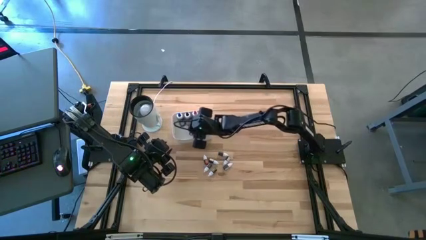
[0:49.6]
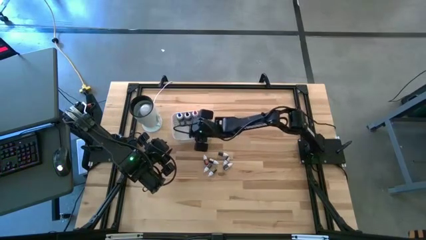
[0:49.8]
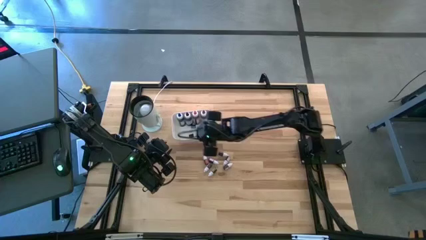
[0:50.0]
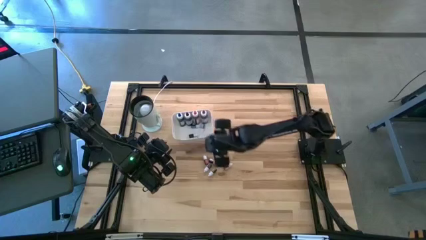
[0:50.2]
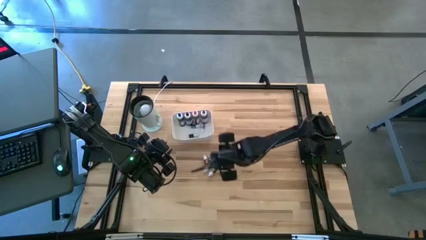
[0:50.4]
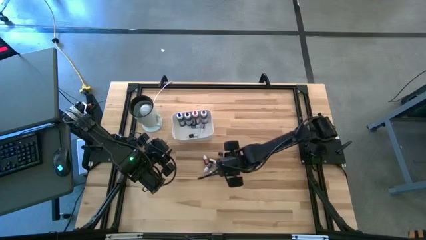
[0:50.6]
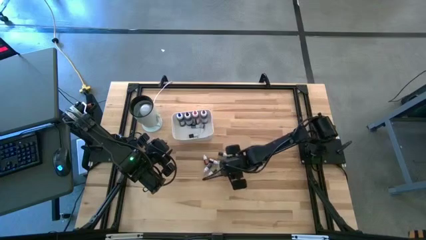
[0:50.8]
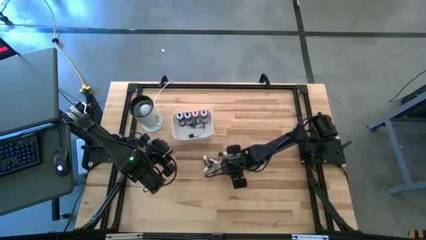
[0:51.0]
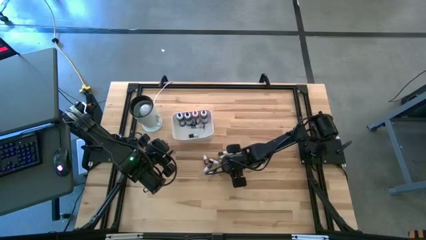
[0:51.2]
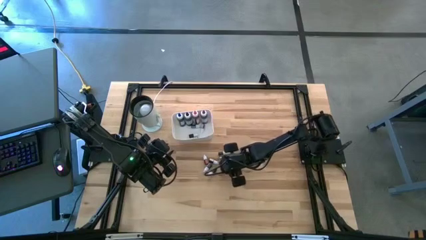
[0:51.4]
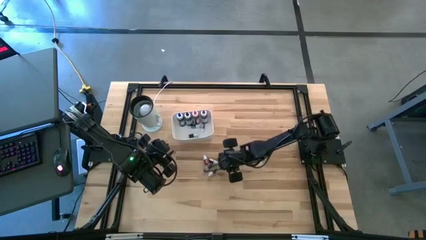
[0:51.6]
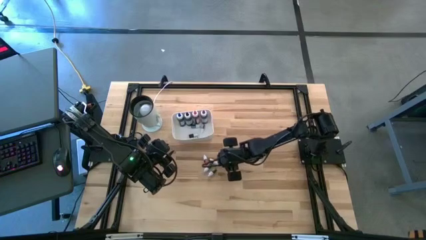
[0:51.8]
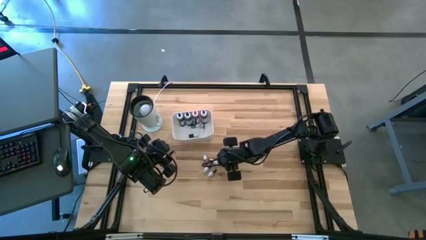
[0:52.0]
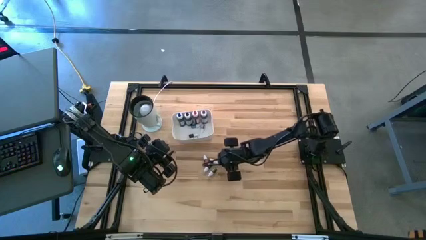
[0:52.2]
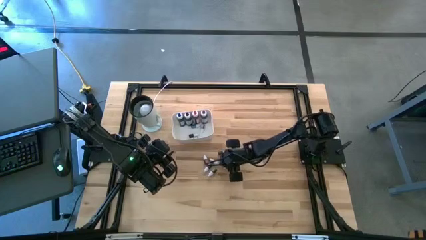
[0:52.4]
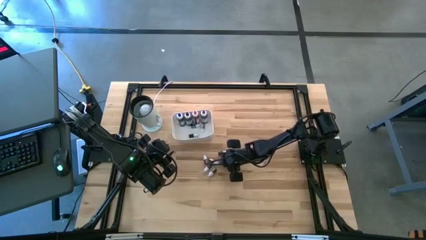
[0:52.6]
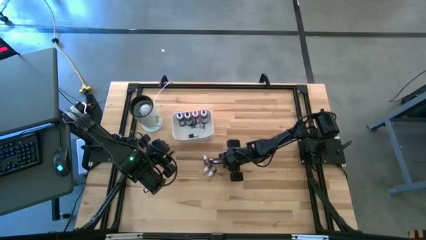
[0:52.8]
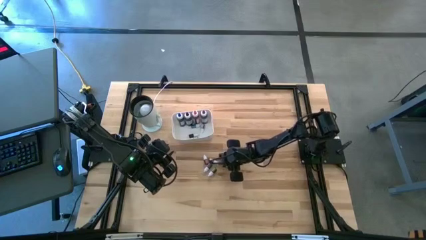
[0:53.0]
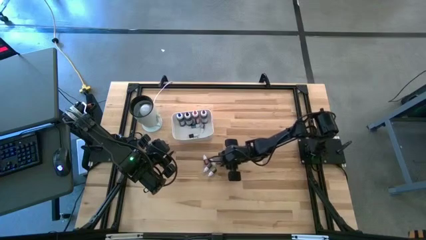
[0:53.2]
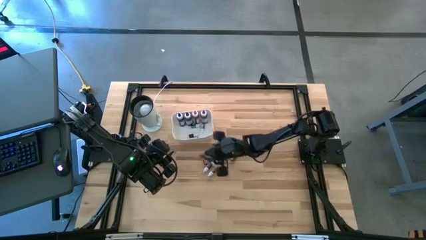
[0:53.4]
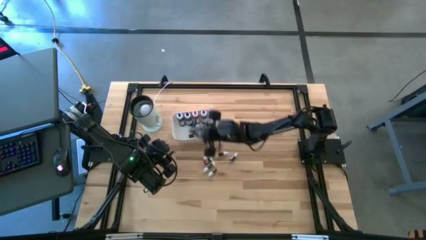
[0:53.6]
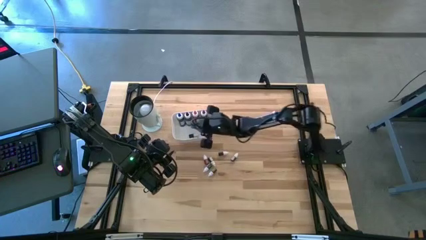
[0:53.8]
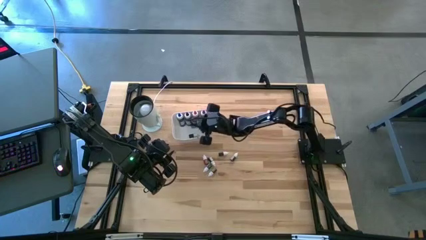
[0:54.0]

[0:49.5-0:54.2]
Task: Pick & Place food coloring
Put the small brown food coloring bottle into the white bin

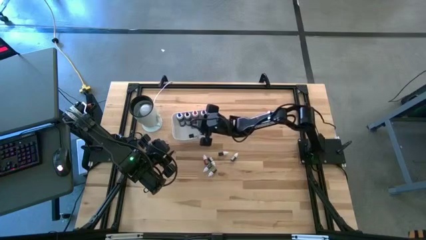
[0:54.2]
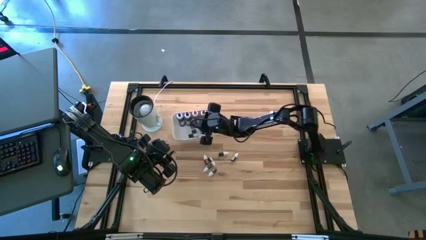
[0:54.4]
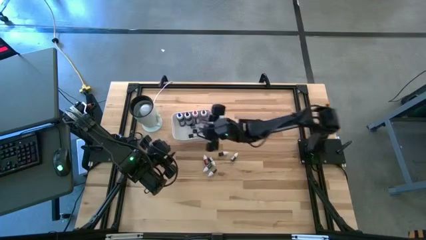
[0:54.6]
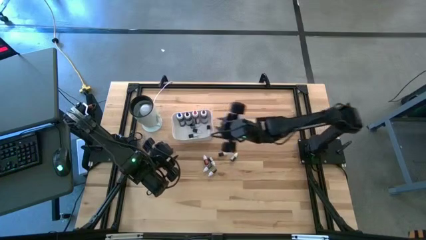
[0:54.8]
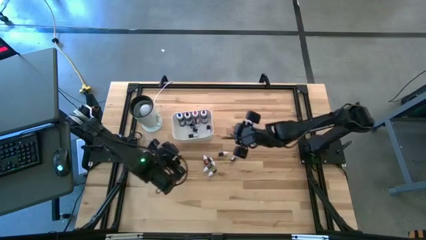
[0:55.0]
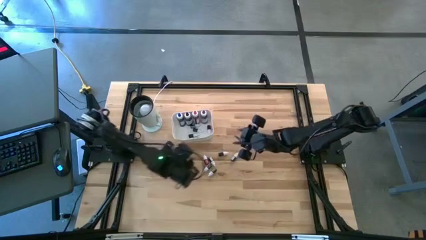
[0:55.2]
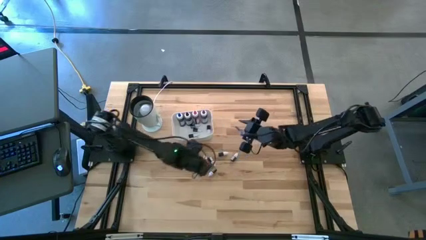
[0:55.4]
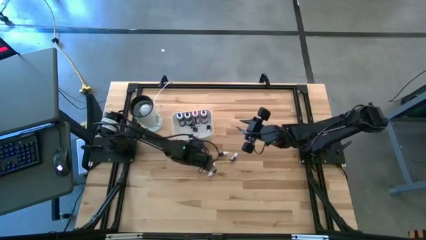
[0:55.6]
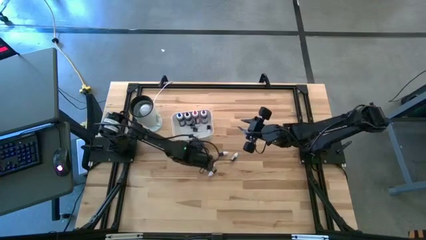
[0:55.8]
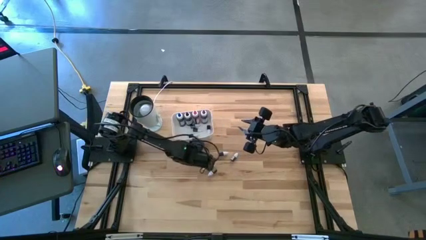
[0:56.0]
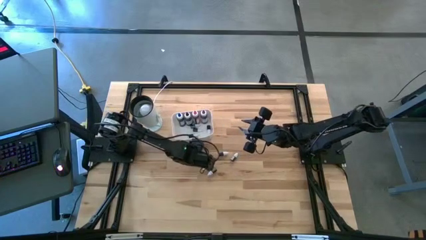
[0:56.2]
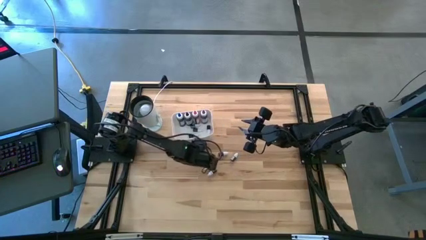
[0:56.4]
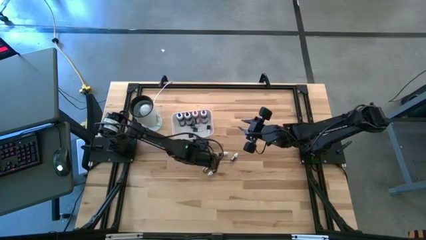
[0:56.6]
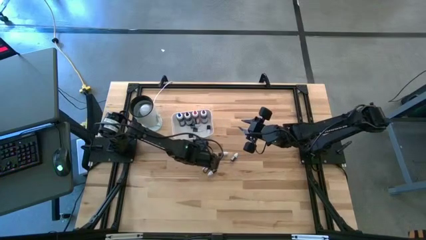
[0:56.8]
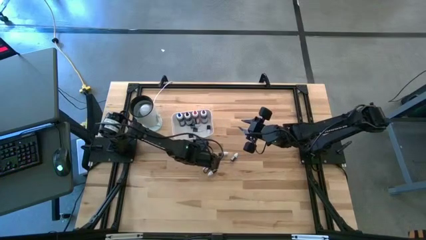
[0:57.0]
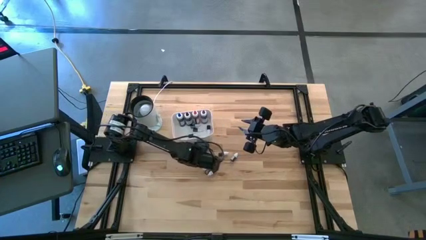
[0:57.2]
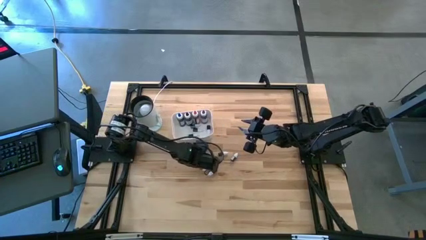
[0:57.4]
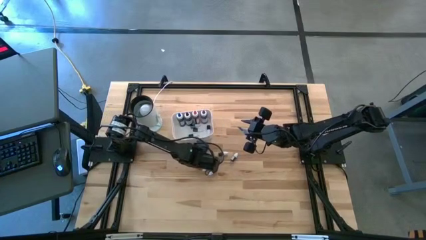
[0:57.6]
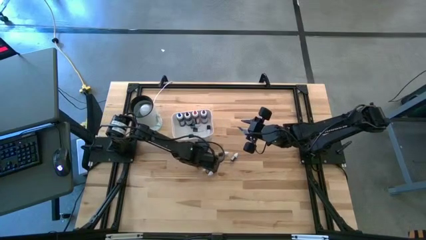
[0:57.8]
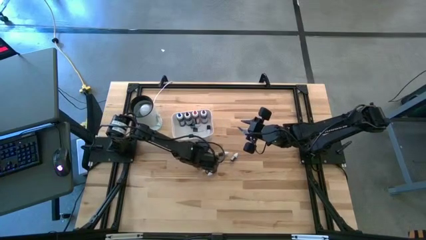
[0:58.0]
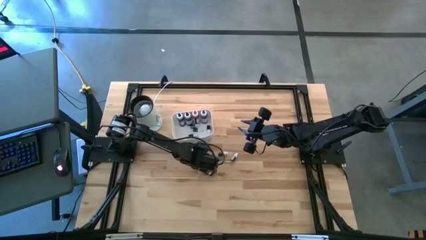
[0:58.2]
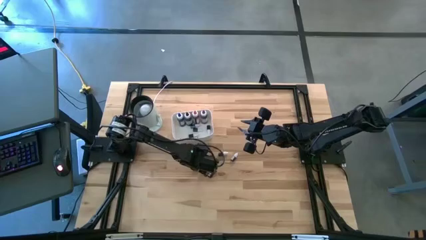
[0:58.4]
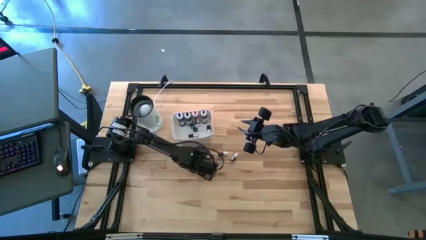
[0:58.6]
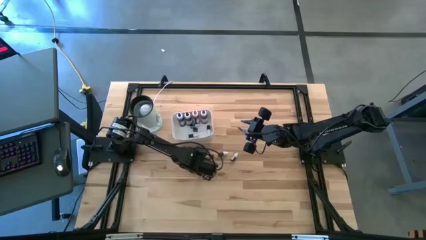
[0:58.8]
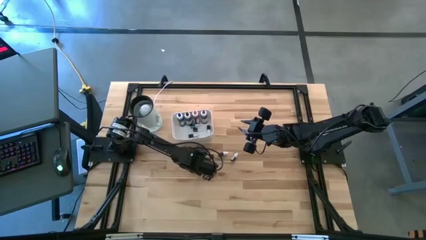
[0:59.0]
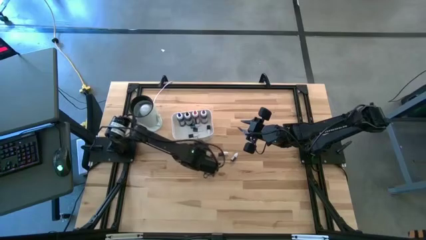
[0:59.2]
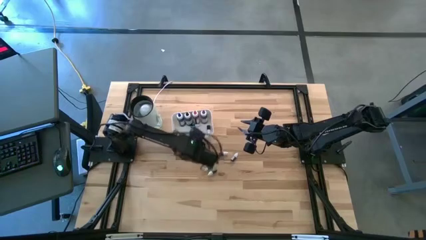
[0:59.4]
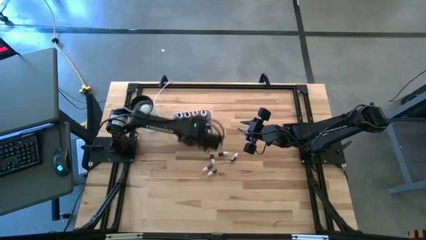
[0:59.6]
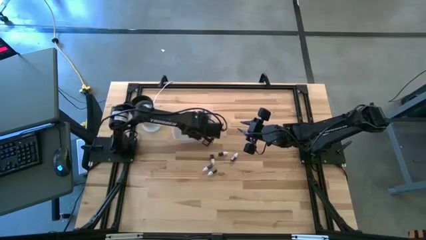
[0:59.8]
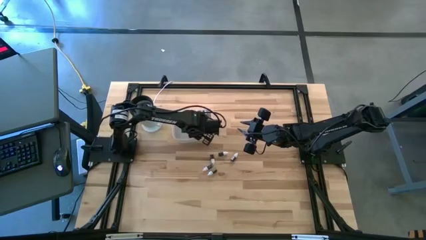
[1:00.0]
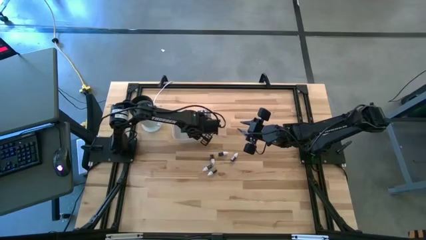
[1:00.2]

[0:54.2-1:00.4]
Put the small orange food coloring bottle into the white bin

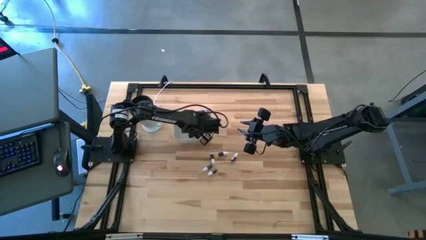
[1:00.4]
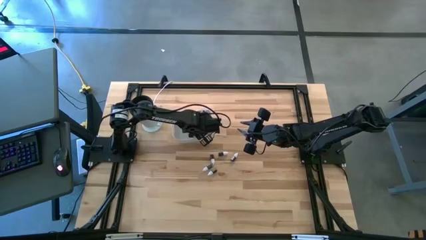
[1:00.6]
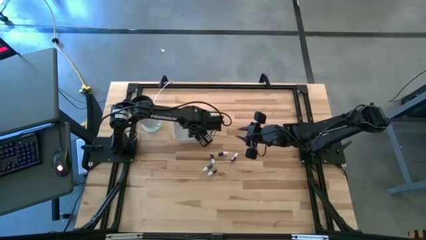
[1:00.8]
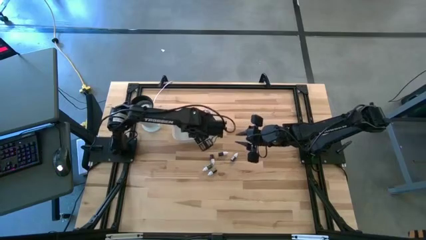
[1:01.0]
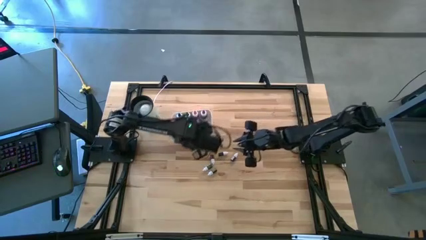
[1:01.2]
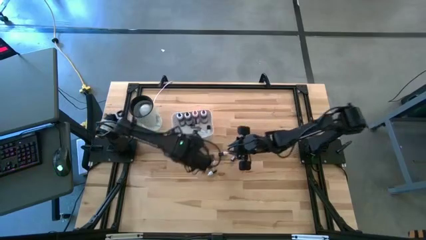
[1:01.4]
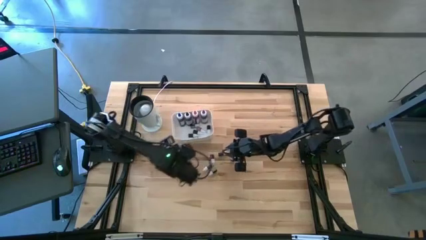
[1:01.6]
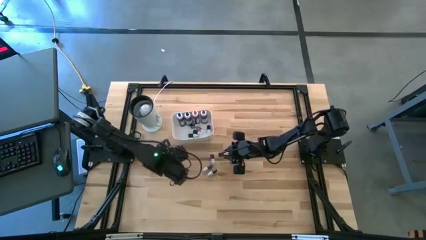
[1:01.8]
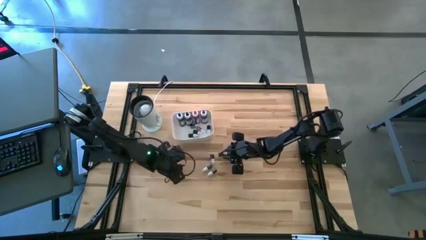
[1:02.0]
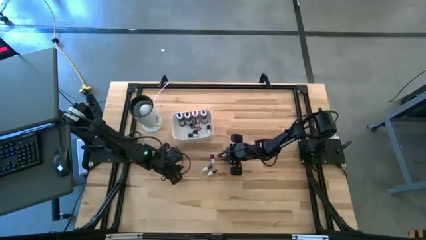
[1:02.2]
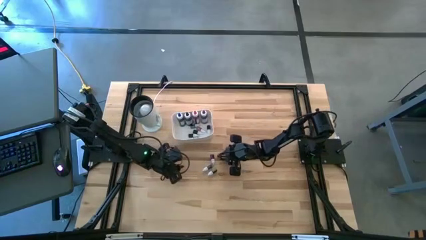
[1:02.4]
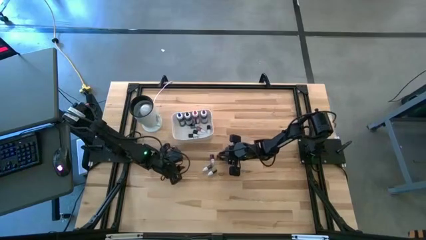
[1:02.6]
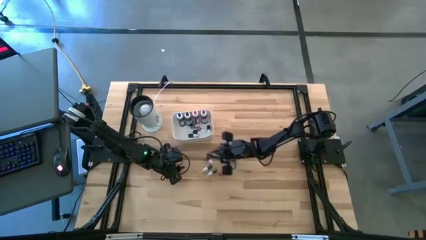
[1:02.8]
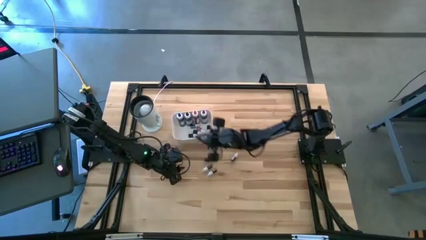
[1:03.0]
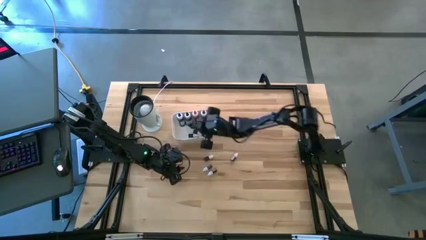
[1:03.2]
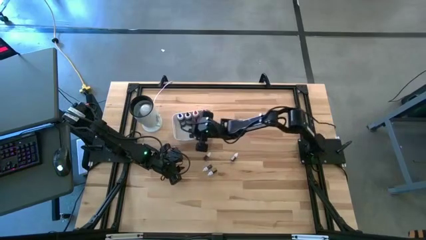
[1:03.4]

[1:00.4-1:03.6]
Put the small black food coloring bottle into the white bin

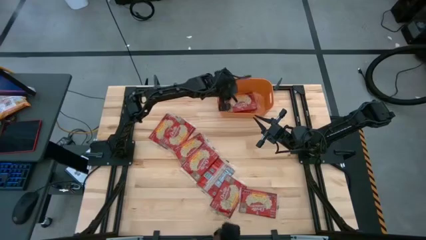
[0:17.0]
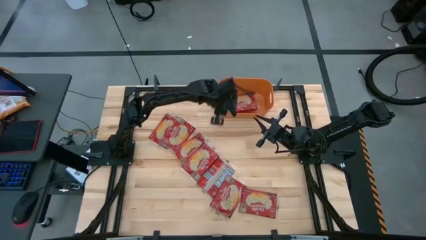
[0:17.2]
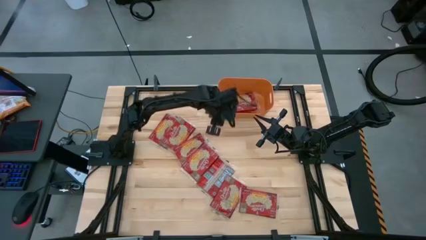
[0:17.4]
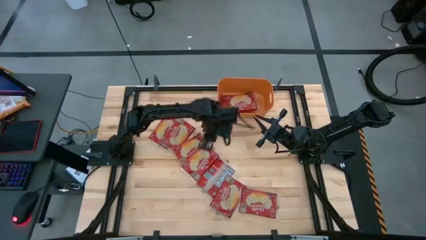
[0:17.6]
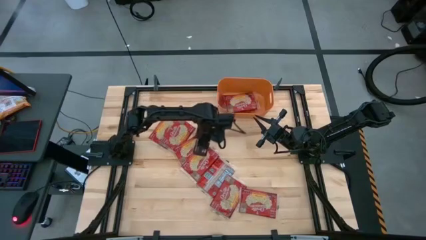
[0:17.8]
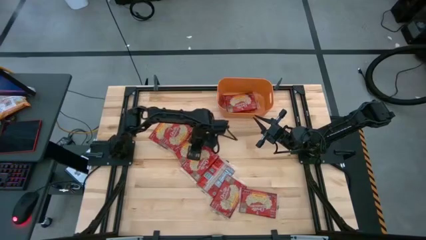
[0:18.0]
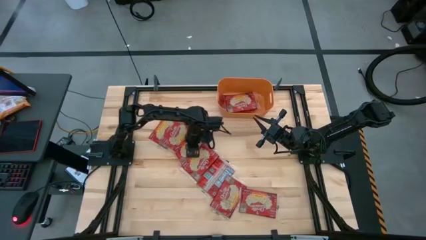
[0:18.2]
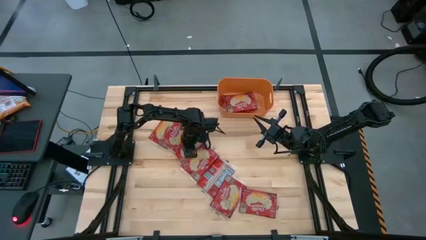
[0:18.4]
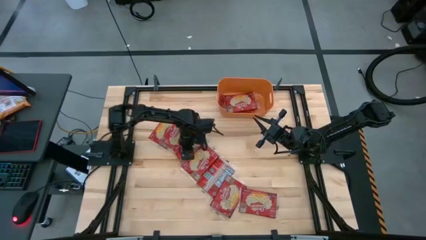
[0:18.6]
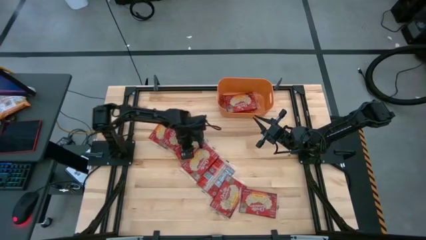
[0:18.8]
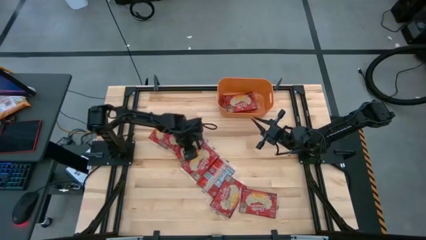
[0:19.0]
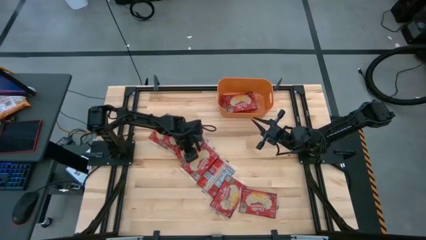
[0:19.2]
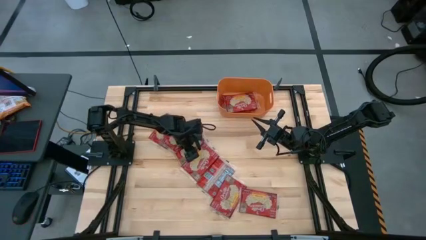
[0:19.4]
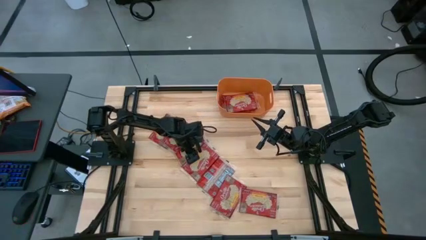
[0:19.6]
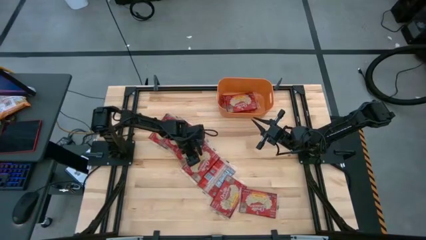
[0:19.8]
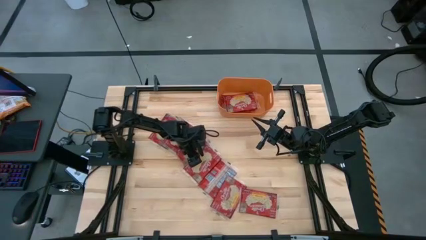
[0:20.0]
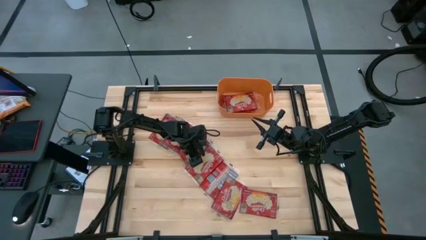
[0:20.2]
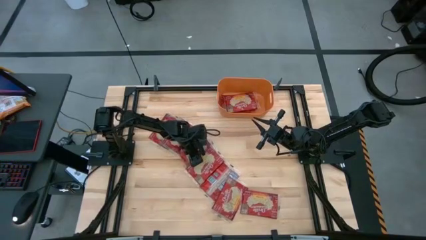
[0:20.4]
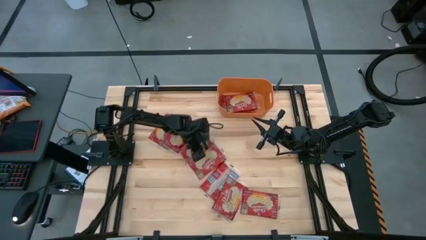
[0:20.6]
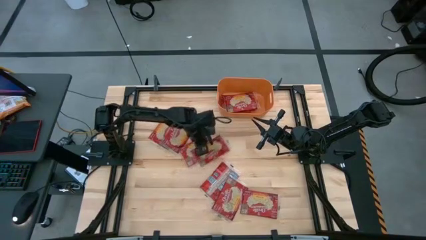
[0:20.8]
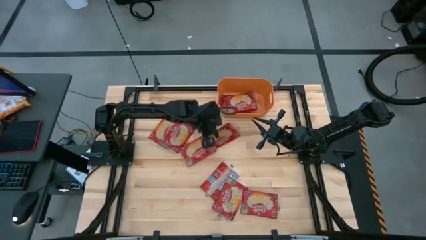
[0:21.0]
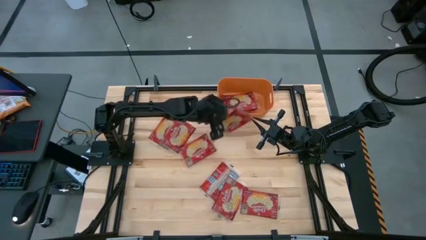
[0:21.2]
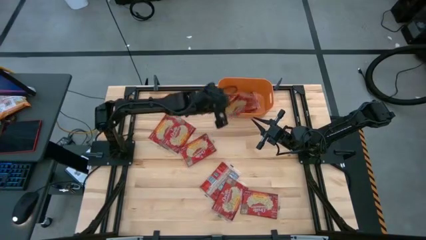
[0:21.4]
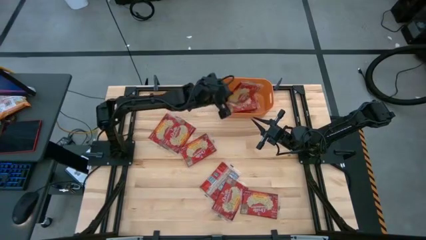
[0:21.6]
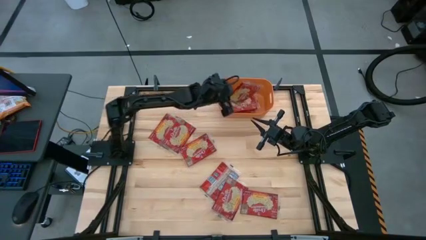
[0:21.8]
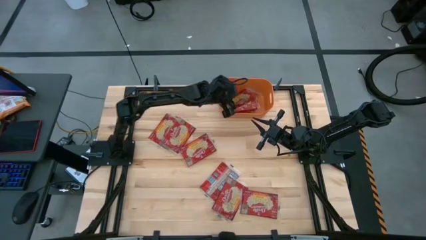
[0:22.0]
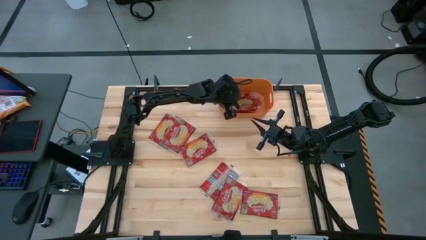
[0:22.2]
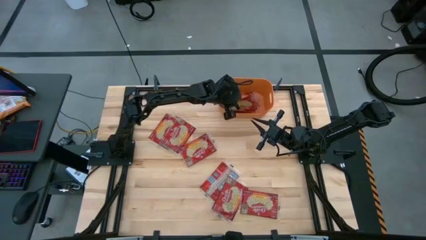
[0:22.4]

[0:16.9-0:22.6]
Task: Sort popcorn bags into baskets
Put the popcorn bag into the bin
